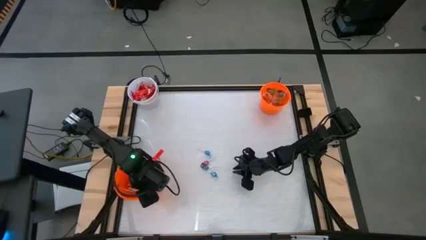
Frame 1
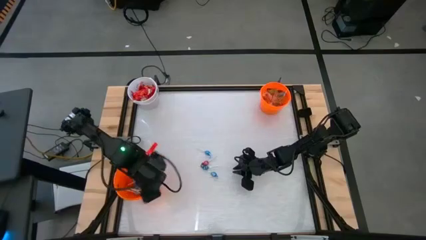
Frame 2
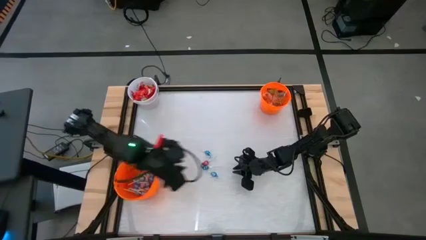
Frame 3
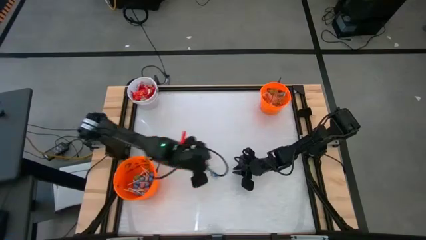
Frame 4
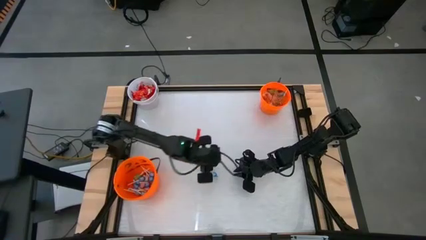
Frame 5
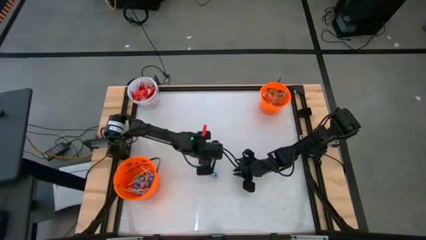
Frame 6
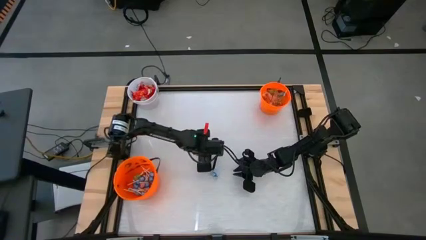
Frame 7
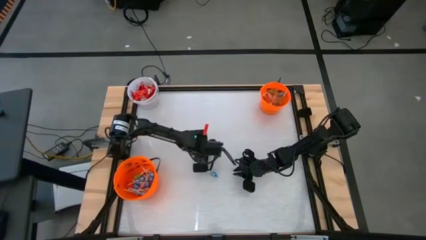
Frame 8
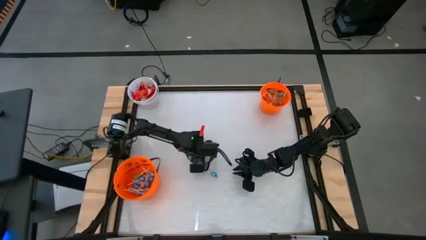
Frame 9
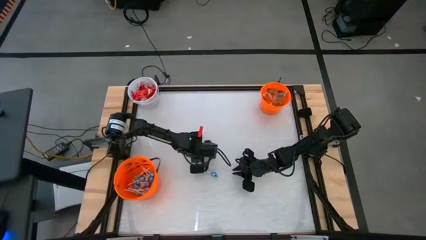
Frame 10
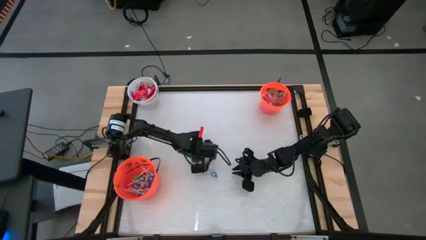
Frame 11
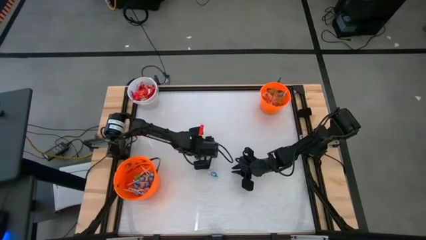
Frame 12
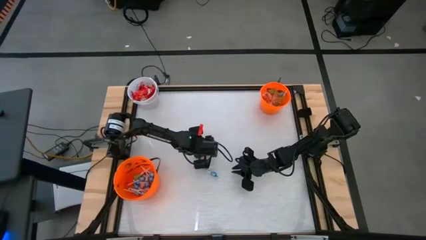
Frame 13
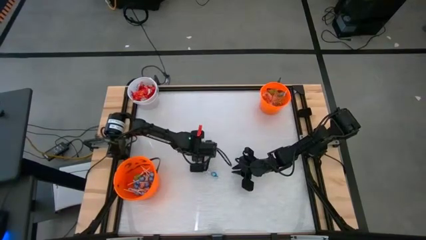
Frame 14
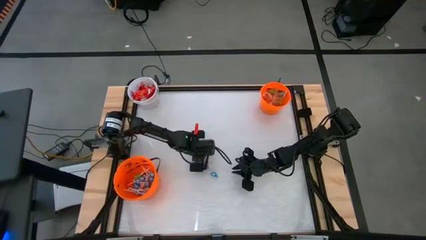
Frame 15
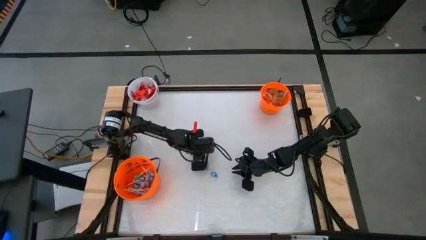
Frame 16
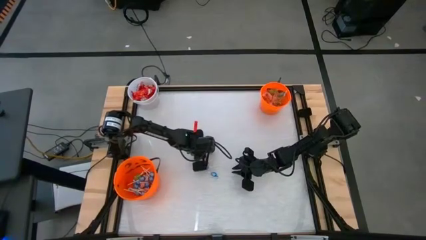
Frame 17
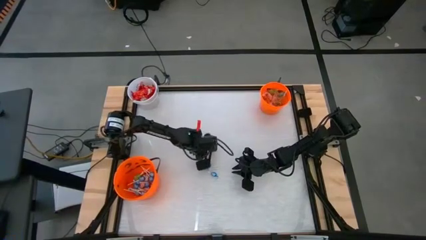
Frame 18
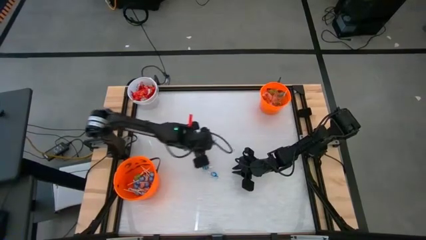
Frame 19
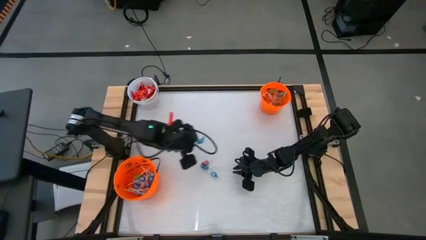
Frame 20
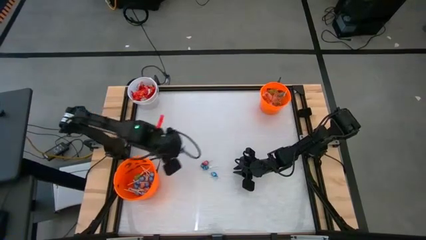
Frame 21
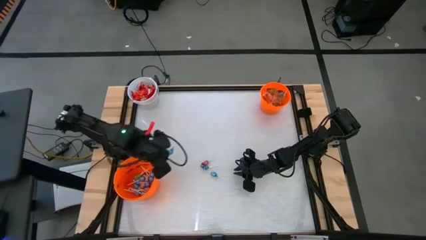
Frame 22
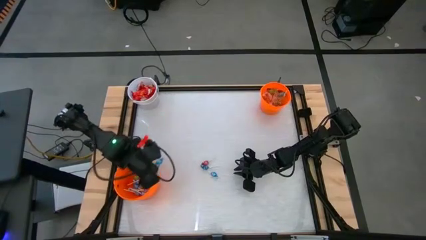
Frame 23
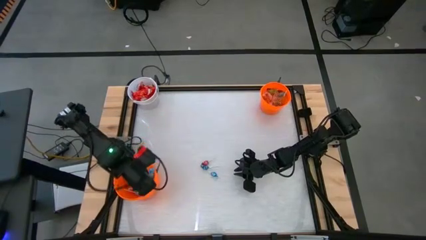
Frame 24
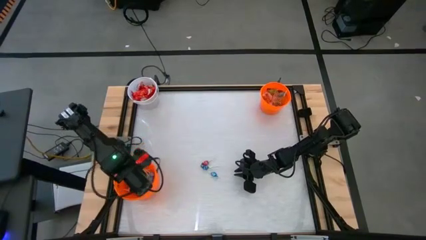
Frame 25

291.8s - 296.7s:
Task: Sort candy by brand, put in halloween buckets
Put the top blue lollipop into the bottom orange bucket

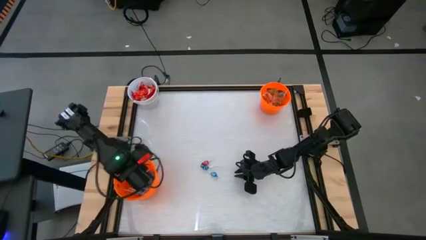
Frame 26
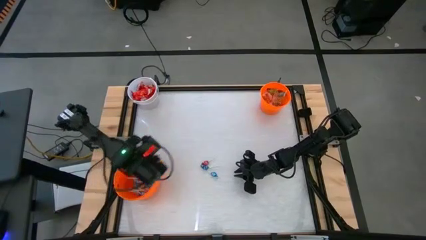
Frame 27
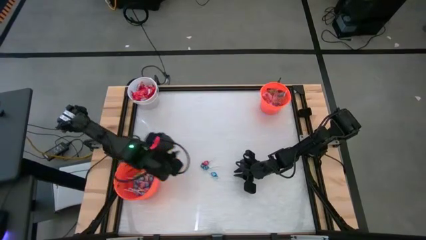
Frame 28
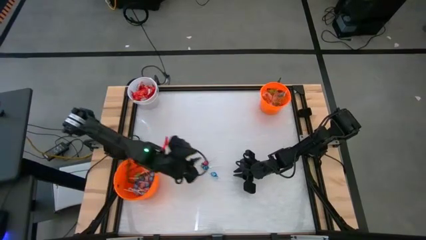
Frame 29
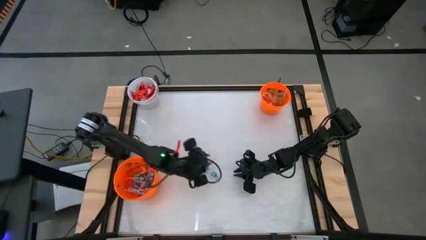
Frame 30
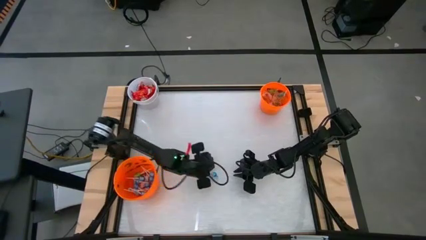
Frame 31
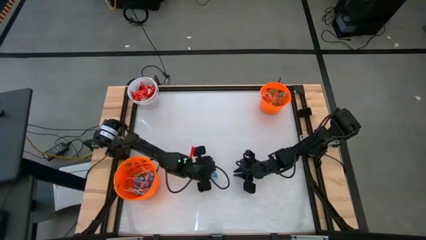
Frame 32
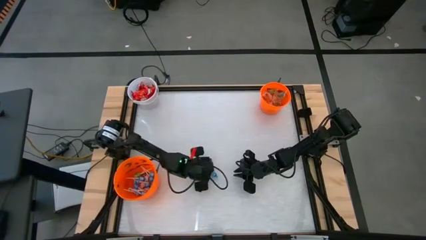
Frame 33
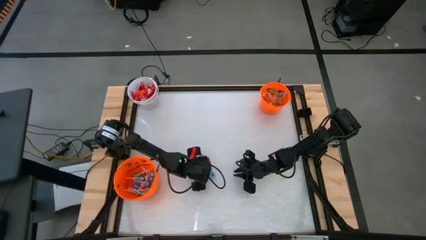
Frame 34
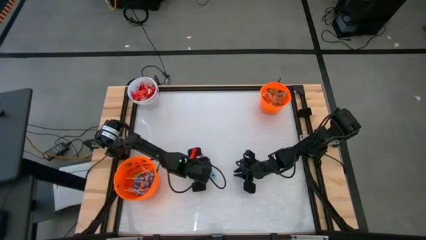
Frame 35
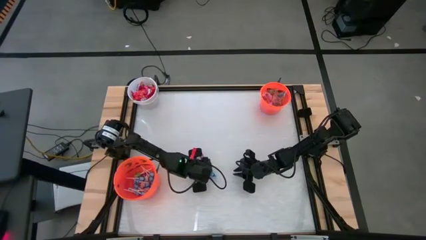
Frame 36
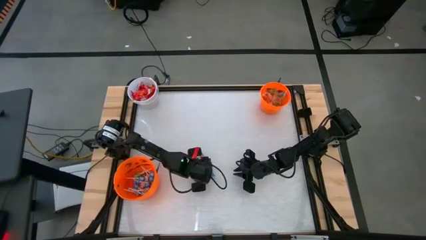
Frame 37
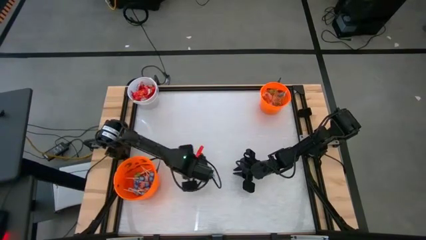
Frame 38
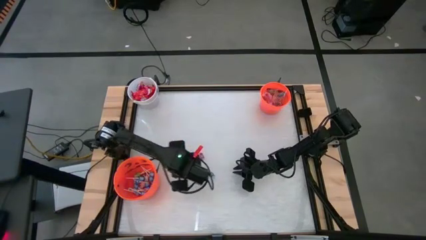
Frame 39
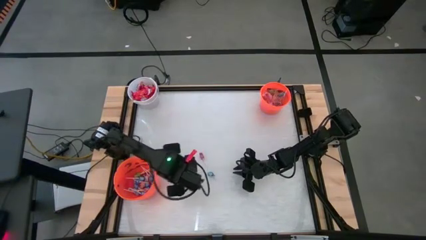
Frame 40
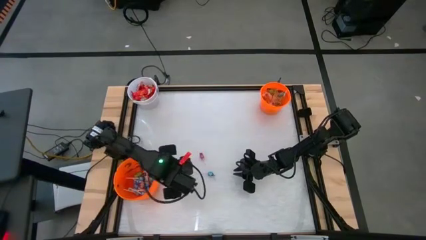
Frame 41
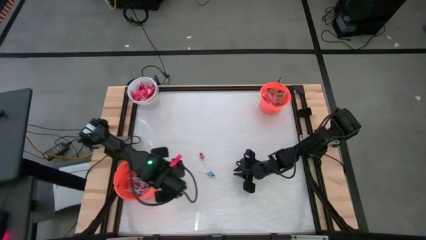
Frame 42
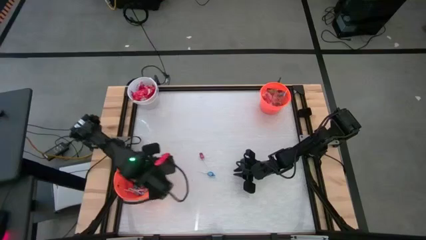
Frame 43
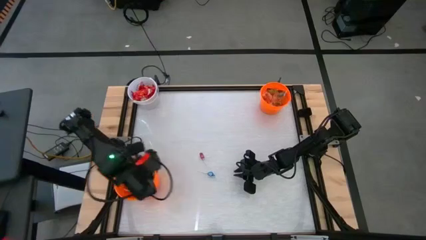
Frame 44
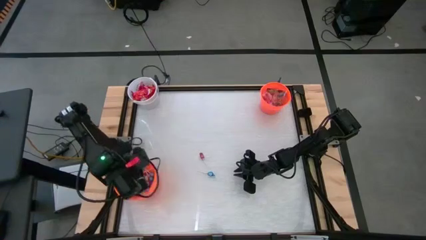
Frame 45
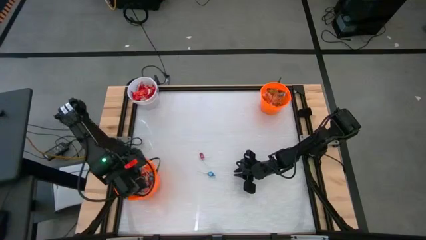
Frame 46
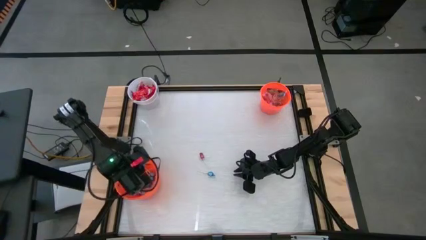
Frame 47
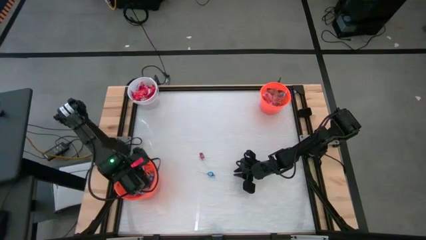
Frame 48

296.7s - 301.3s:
Put the top blue lollipop into the bottom orange bucket

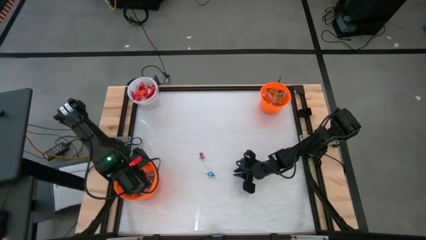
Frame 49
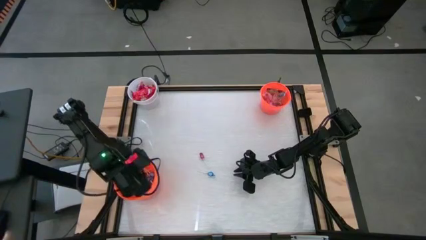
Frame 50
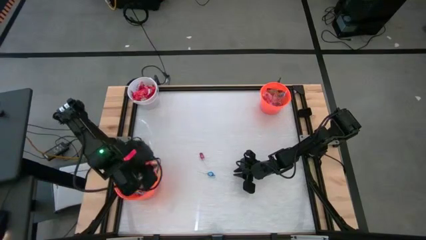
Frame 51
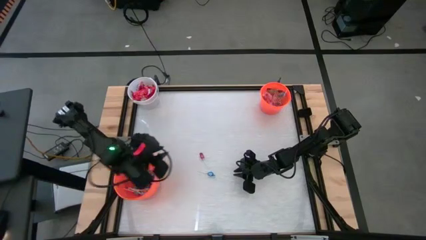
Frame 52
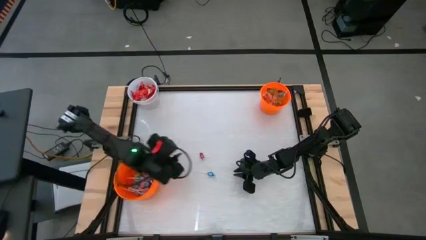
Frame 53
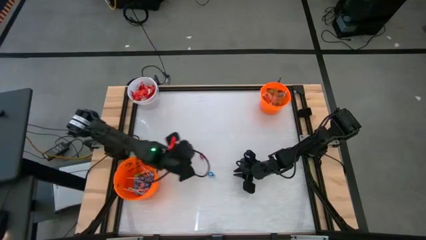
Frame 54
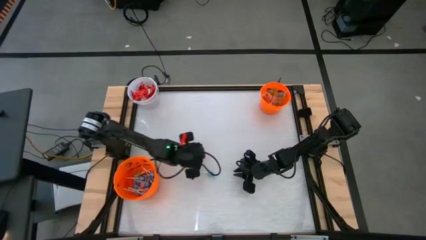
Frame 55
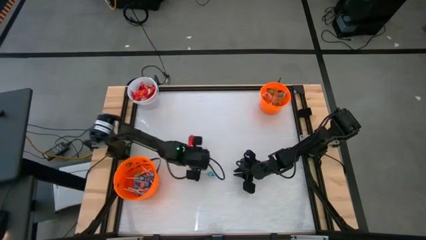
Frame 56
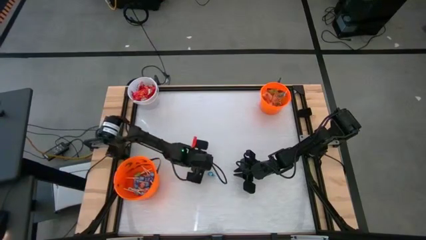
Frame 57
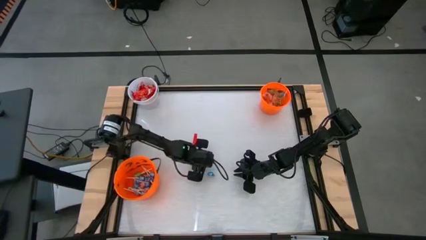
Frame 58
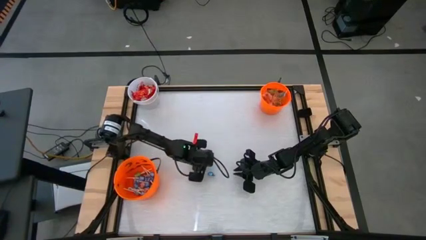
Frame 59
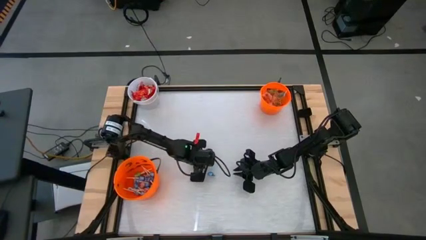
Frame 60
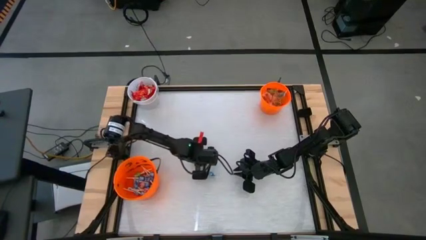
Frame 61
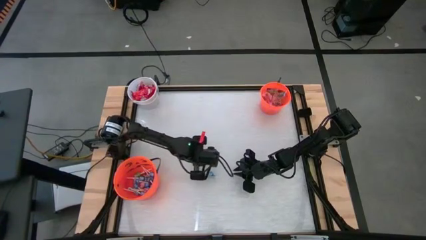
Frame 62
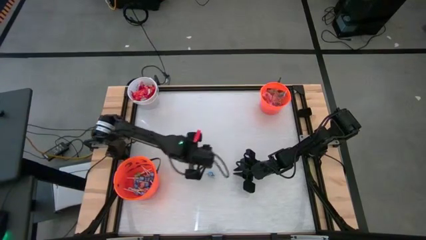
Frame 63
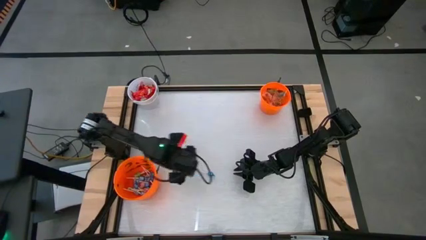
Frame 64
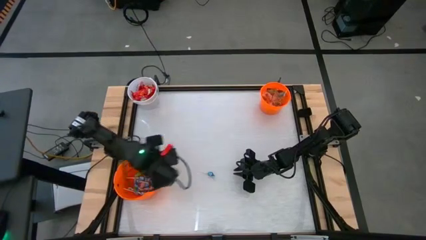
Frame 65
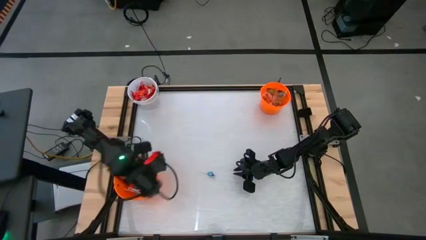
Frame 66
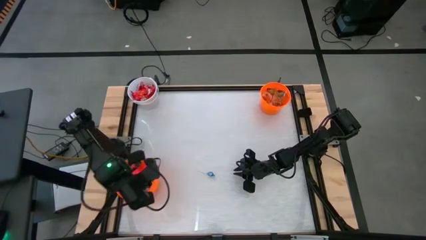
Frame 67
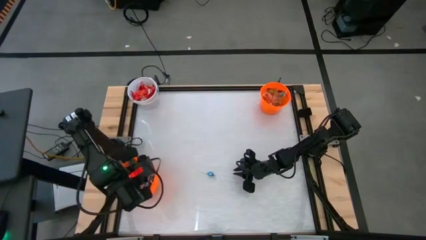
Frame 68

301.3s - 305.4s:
Put the pink lollipop into the bottom orange bucket

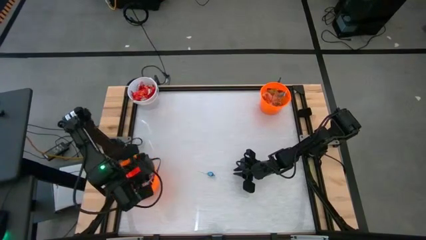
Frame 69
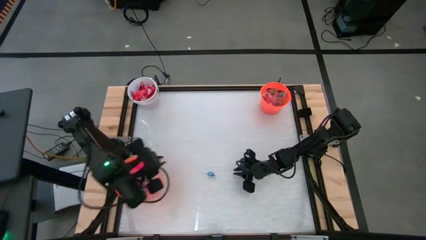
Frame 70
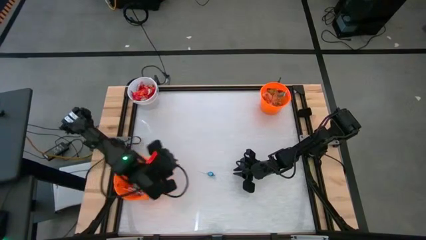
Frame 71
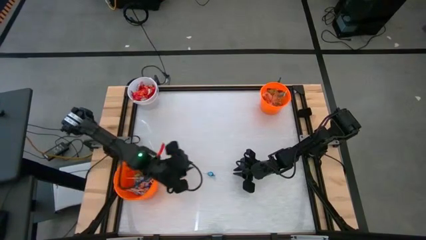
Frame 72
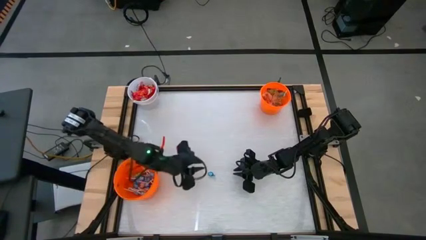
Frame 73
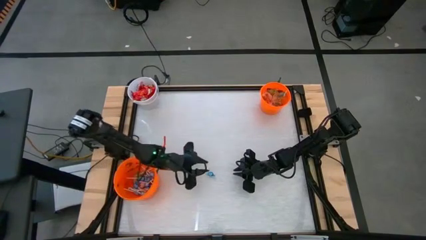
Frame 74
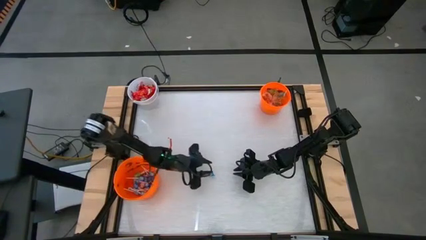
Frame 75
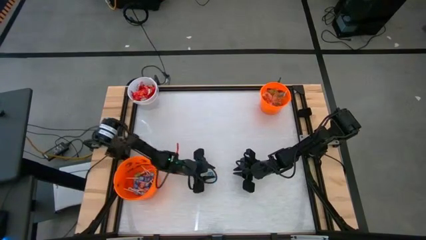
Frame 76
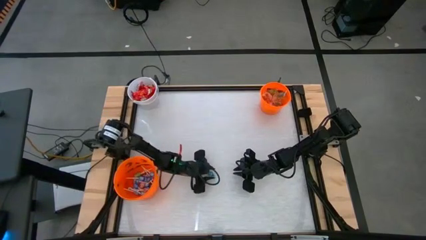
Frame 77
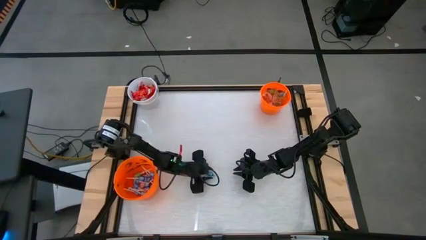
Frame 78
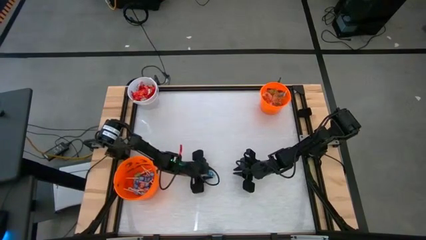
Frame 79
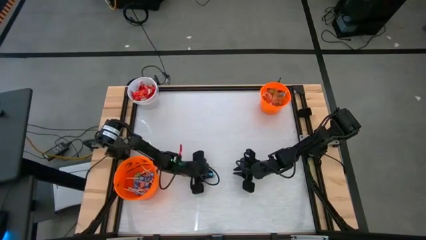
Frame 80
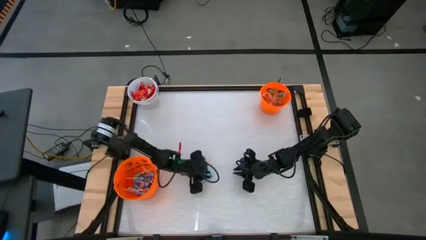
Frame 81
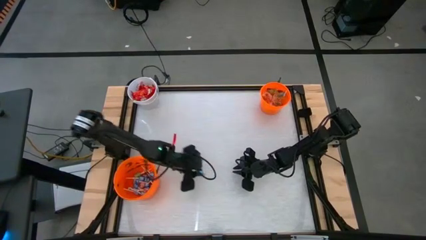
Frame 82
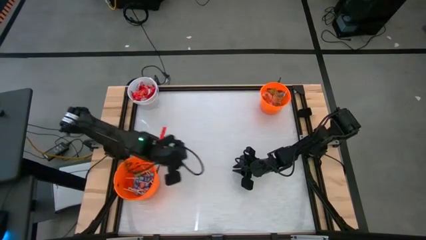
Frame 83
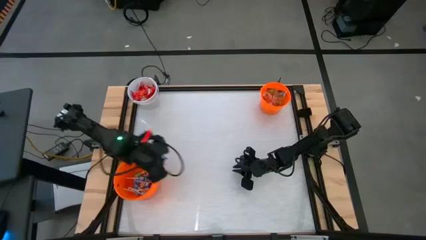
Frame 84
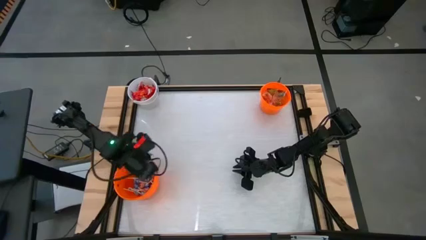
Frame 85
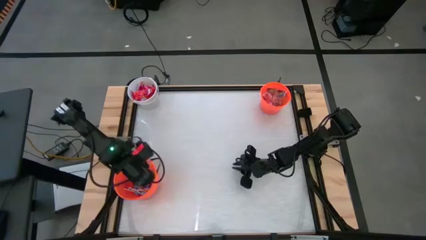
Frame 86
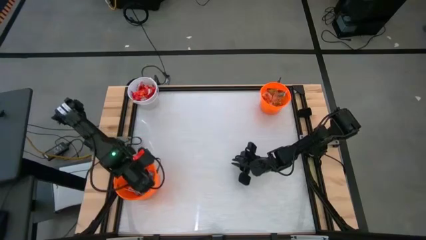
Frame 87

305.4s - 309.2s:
Put the blue lollipop into the bottom orange bucket

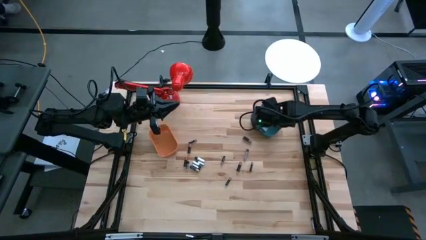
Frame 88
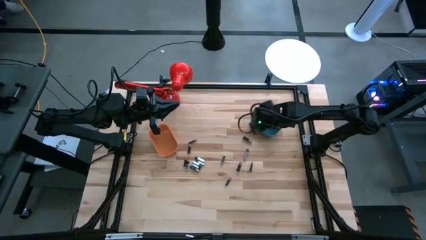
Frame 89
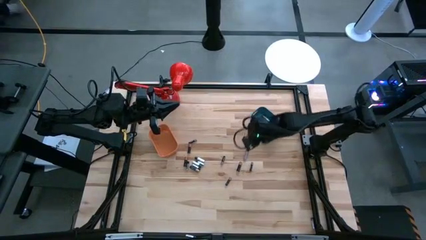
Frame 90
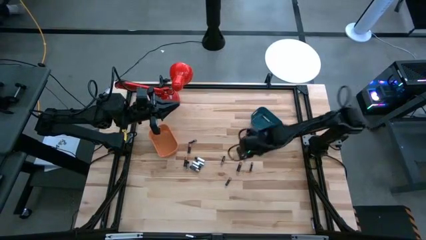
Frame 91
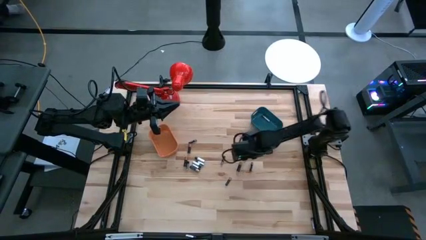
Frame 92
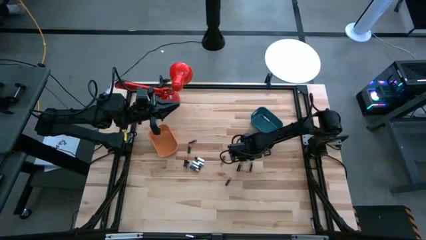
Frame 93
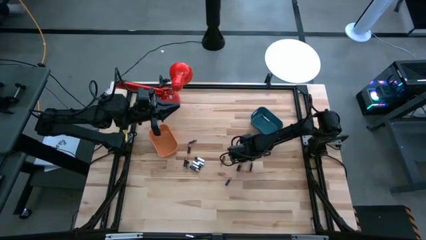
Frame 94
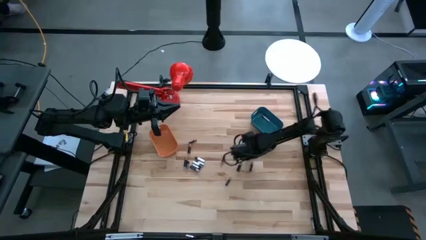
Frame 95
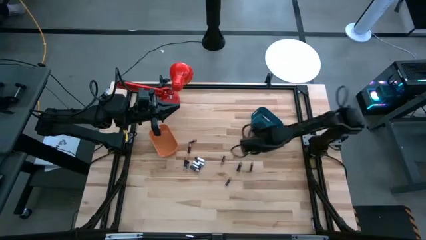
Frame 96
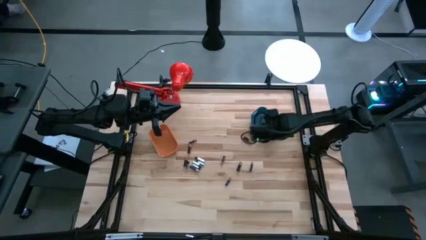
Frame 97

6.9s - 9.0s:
Task: Sort batteries
Put the silver battery into the blue bin
